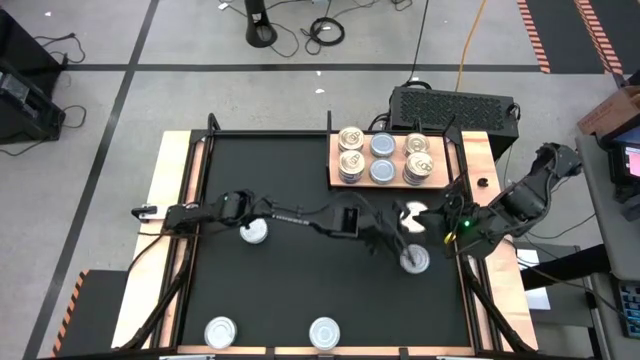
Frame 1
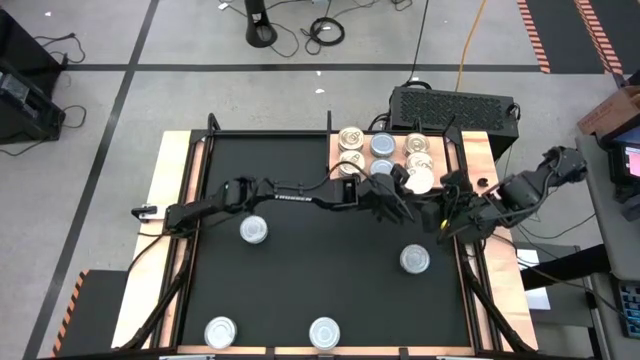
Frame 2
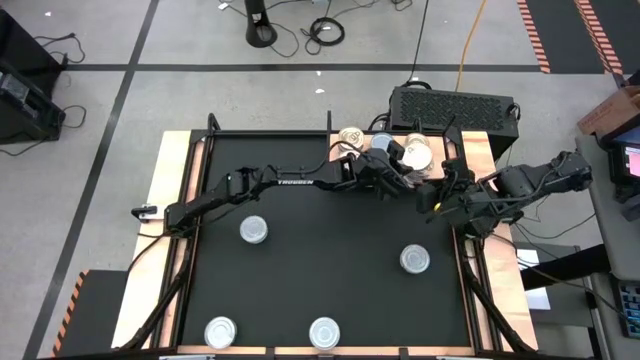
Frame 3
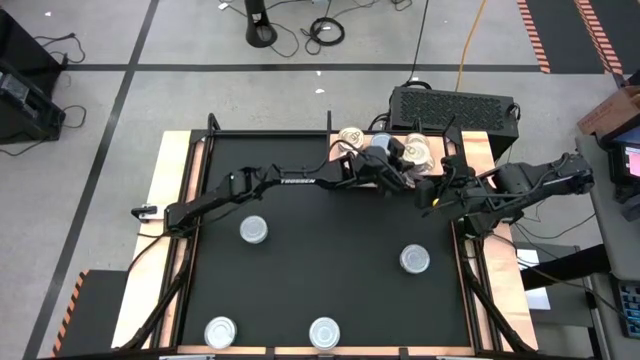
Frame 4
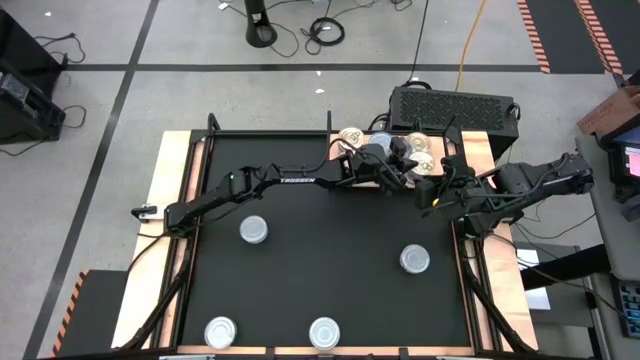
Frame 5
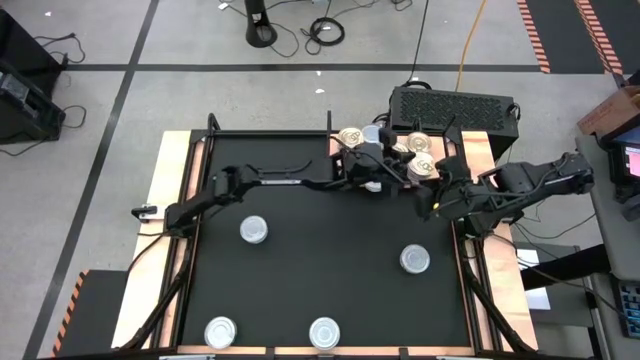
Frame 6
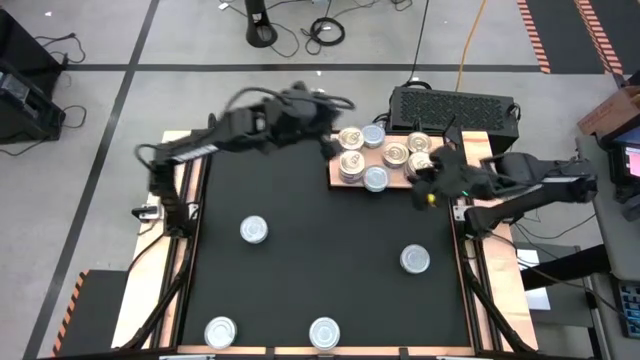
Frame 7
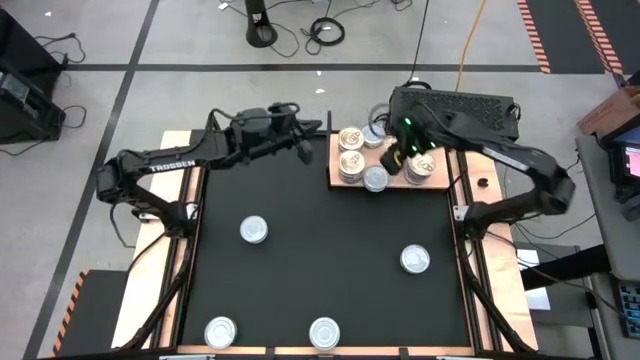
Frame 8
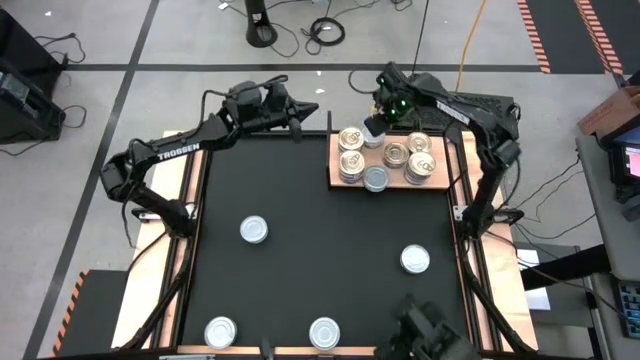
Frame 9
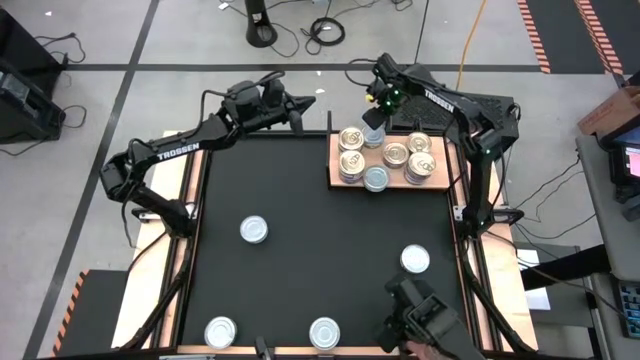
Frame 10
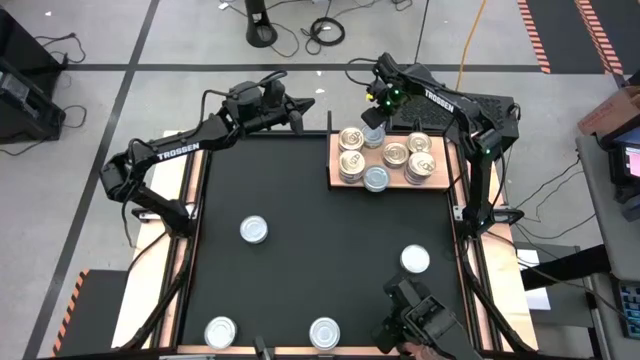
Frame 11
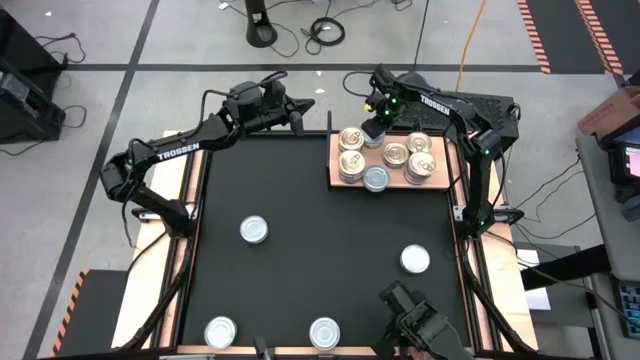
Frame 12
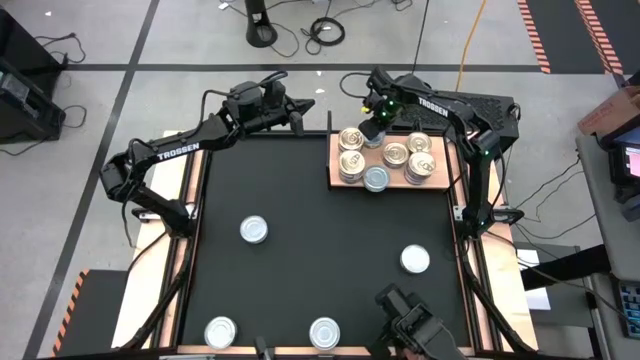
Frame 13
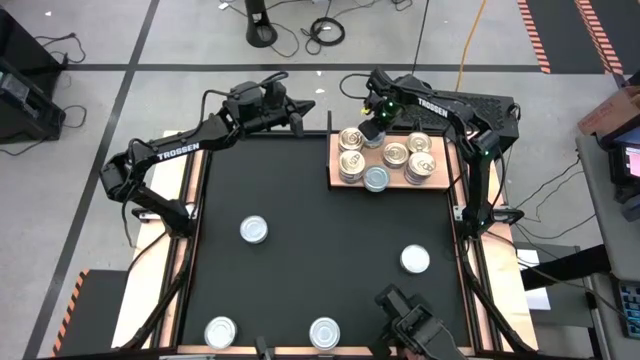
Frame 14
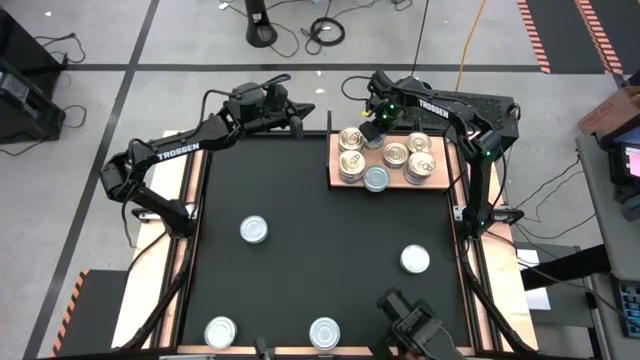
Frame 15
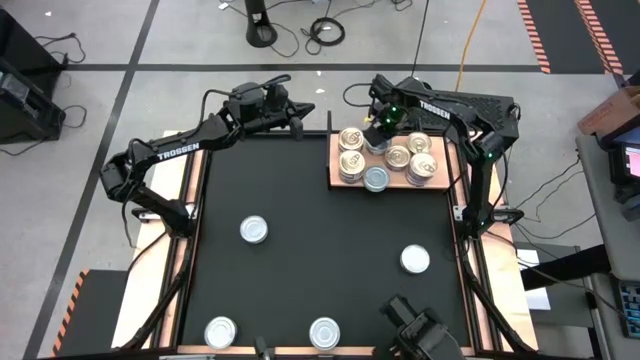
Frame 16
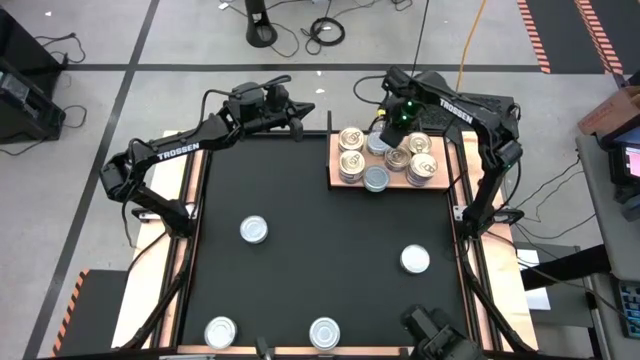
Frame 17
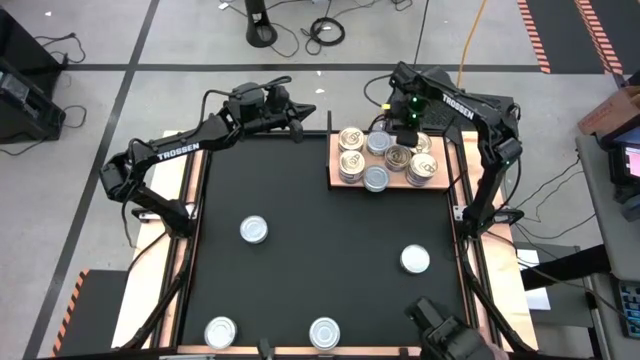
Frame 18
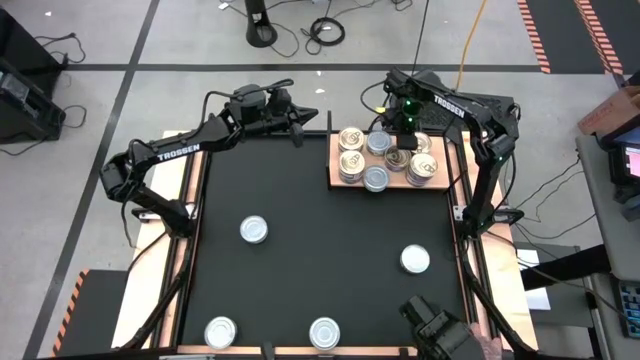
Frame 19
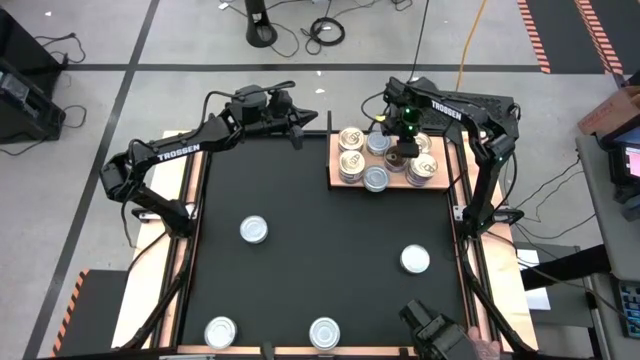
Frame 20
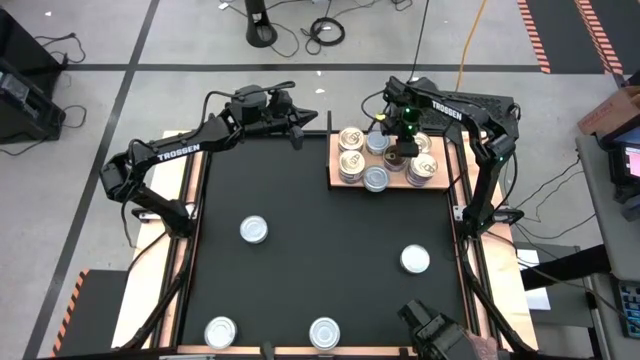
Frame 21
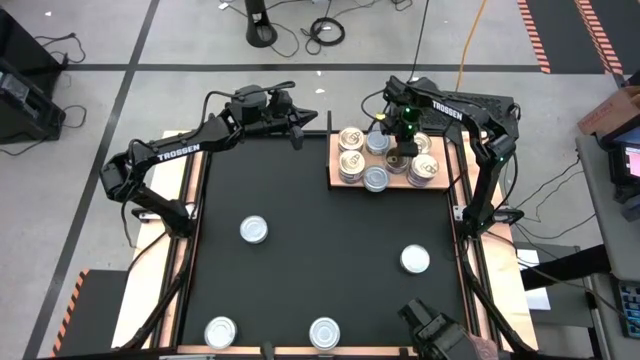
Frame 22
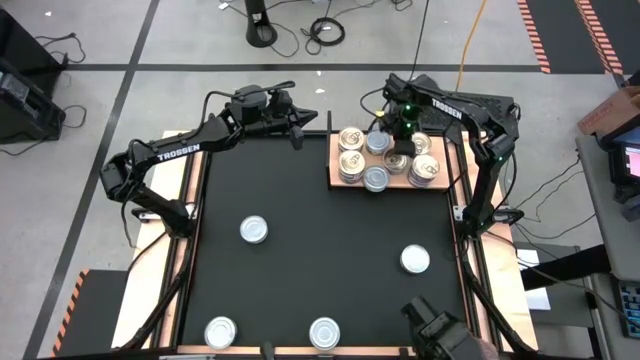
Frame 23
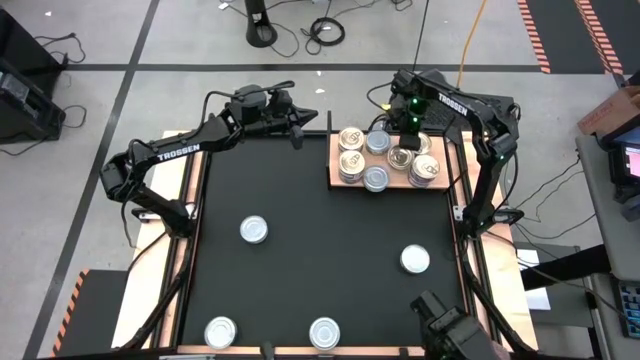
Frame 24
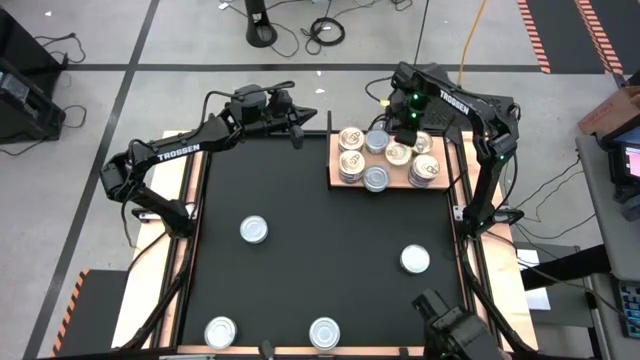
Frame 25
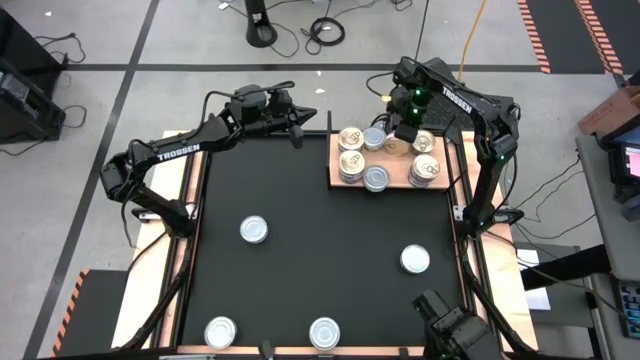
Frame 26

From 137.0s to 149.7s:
Task: Stack canned seafood by type on shelf
Stack the blue pink tuna can on top of the other blue pink tuna can on the shelf

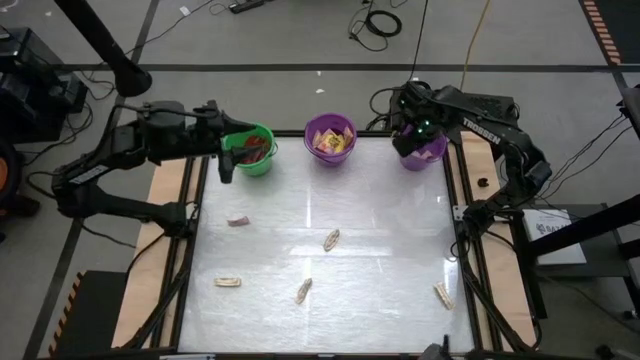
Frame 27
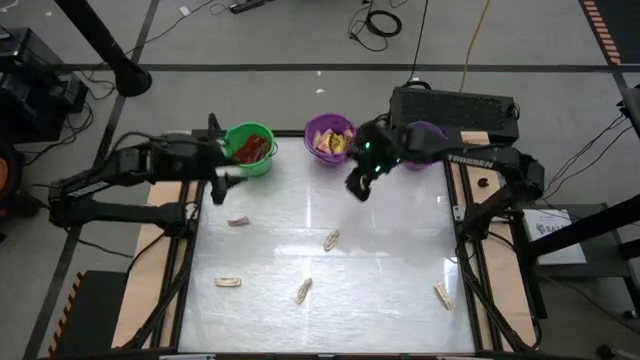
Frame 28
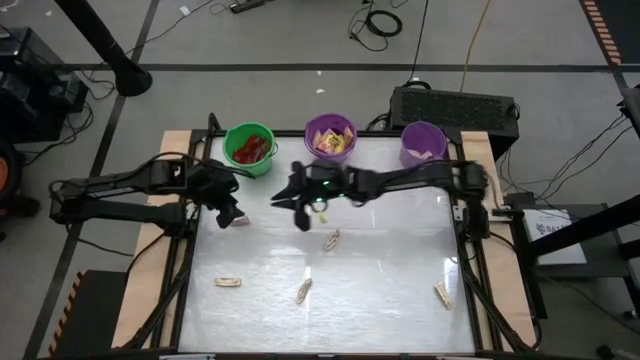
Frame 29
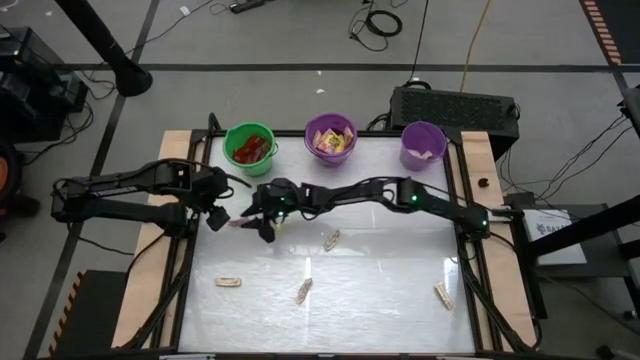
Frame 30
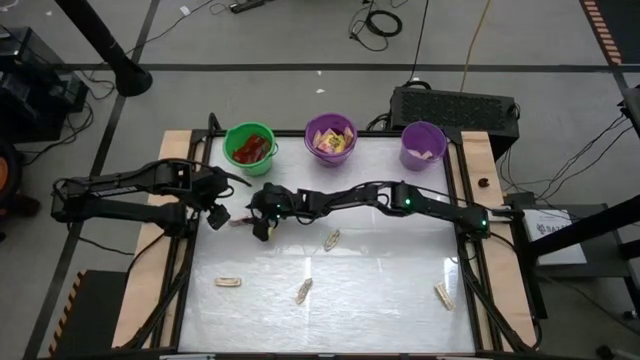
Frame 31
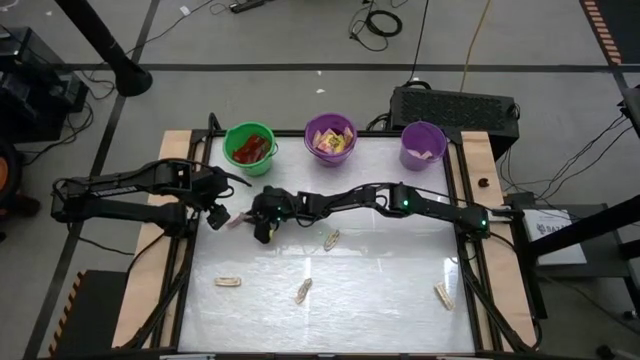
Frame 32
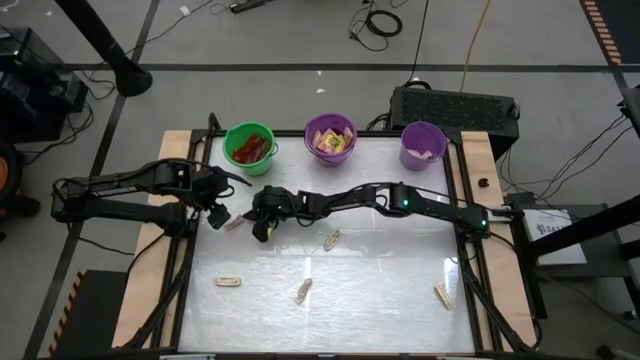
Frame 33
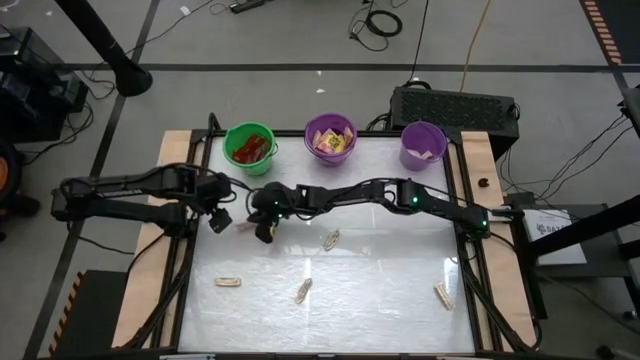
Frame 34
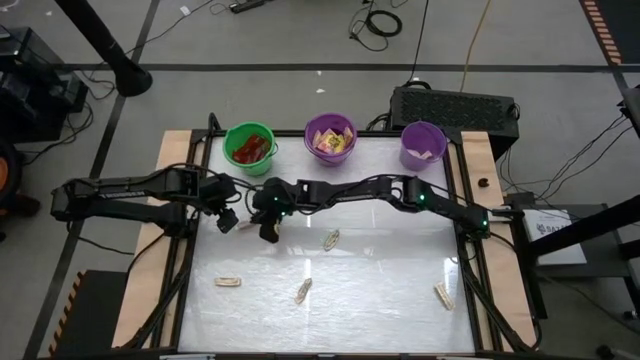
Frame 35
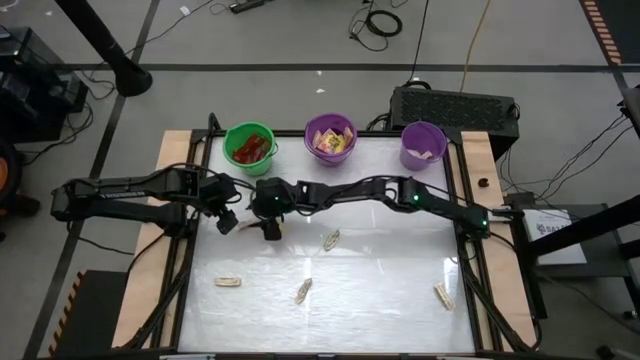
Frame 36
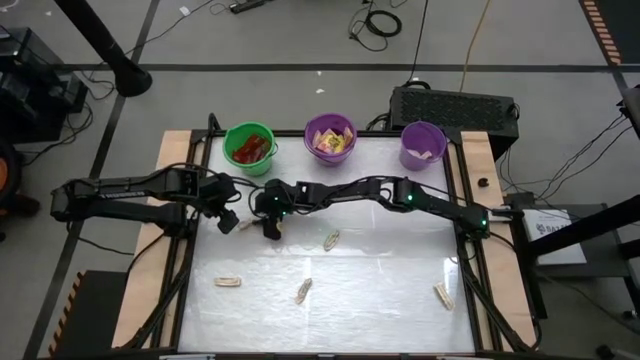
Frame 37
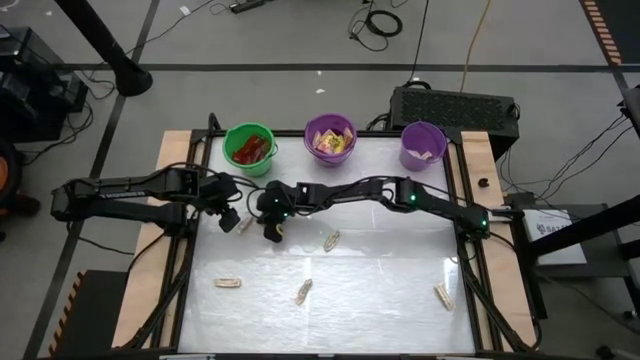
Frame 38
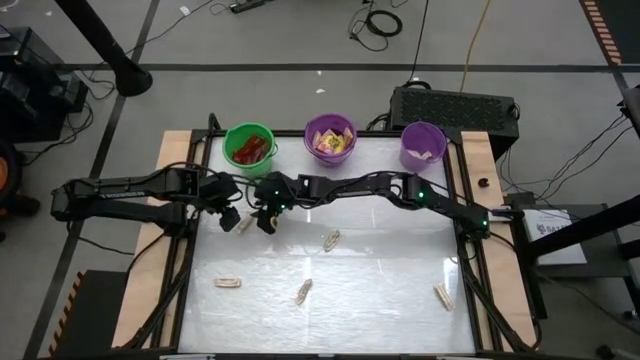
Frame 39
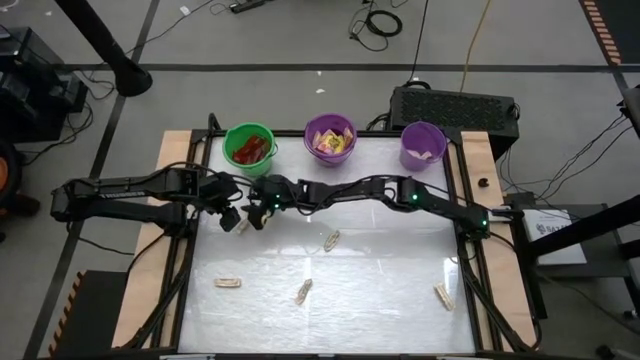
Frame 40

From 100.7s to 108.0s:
Task: Sort candy by brand, put in halloween buckets
Put the white candy pack in the right purple bucket

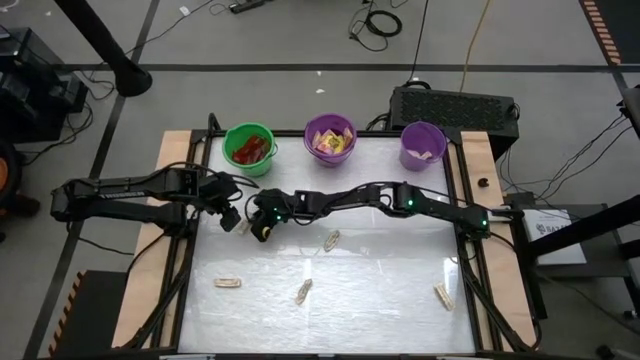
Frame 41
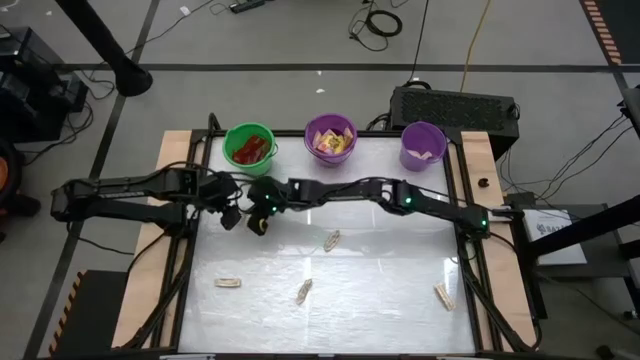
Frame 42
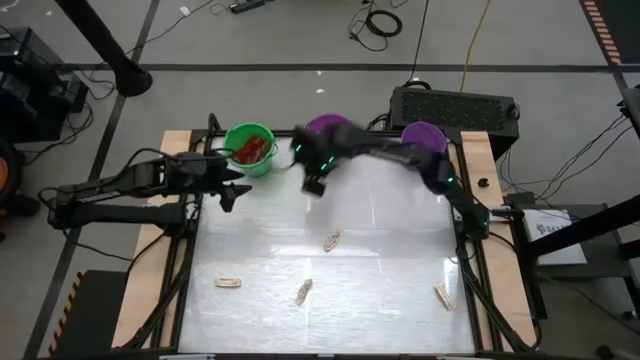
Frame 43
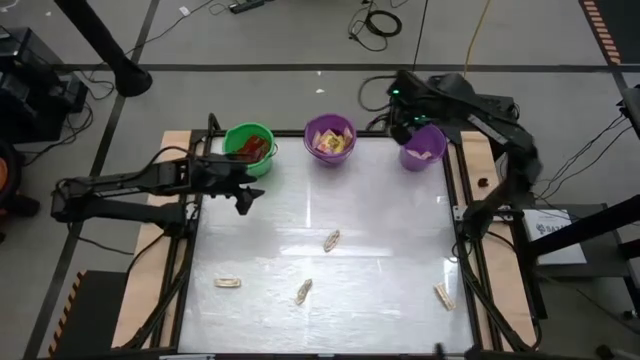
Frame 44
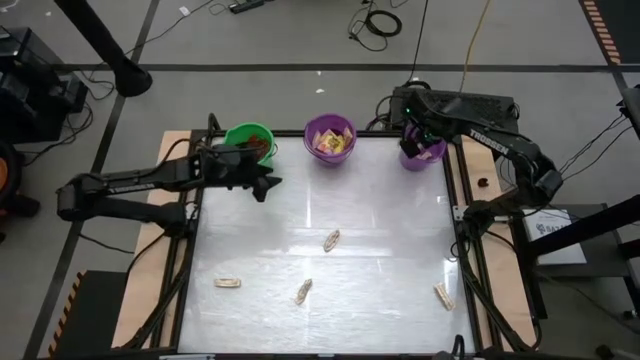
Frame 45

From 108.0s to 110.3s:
Put the white candy pack in the right purple bucket
